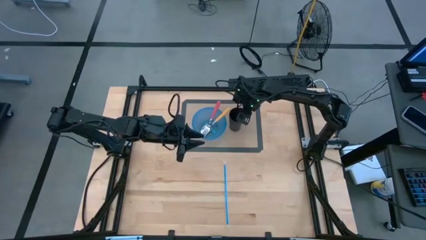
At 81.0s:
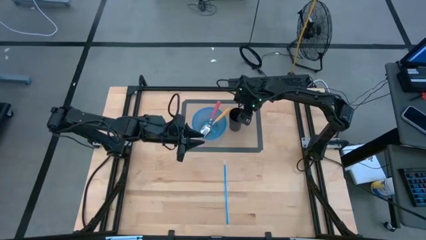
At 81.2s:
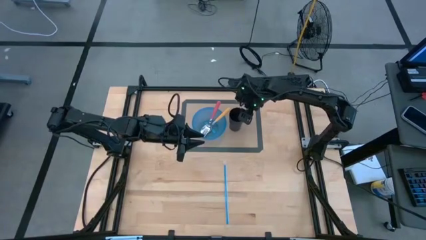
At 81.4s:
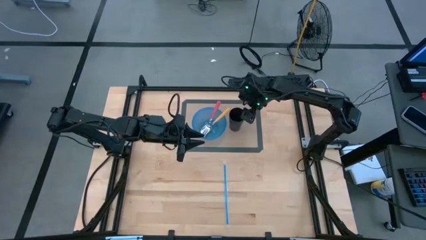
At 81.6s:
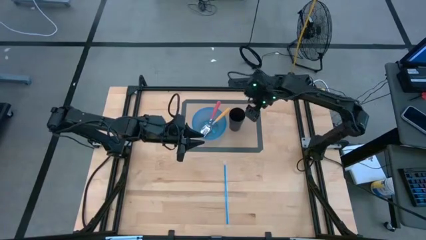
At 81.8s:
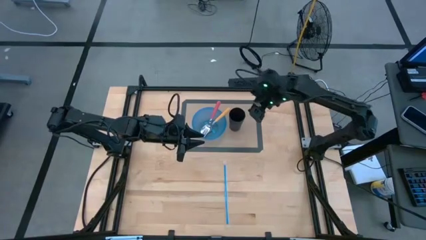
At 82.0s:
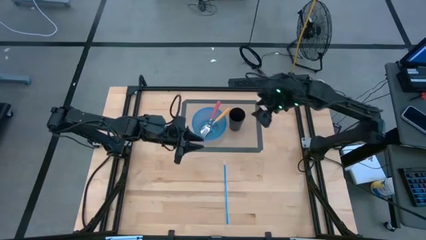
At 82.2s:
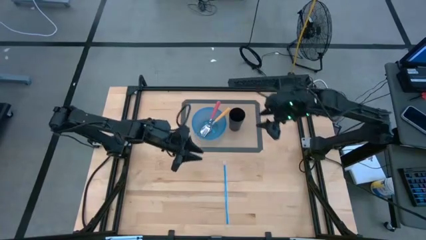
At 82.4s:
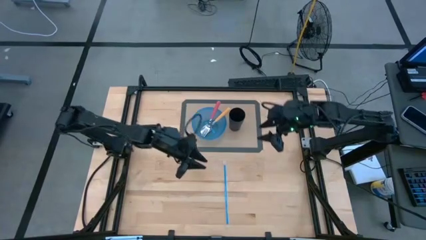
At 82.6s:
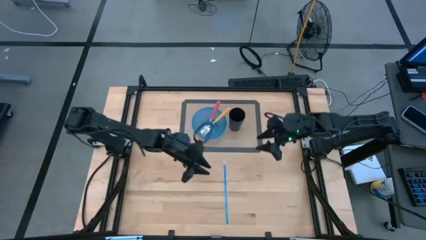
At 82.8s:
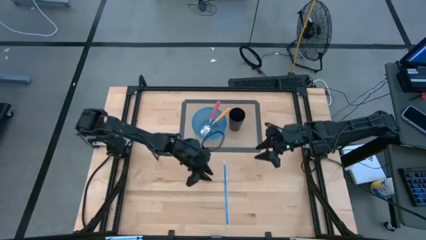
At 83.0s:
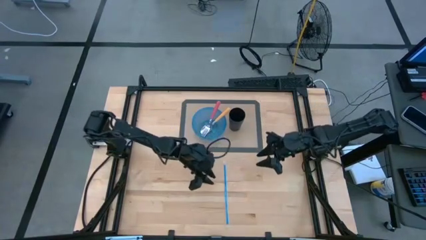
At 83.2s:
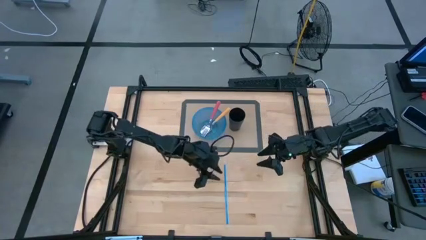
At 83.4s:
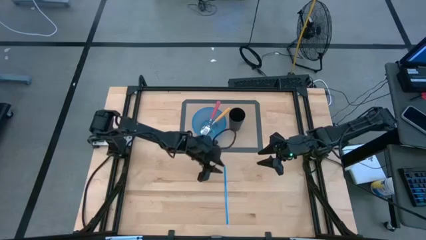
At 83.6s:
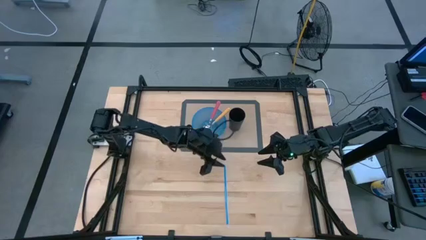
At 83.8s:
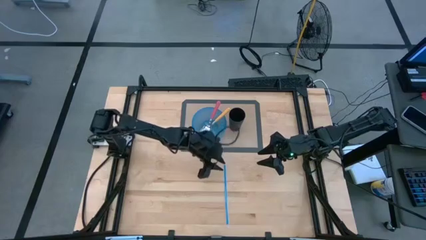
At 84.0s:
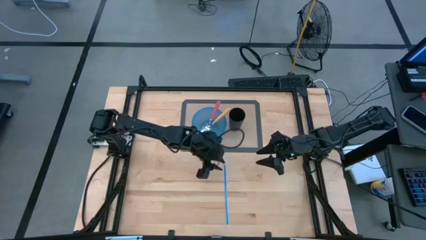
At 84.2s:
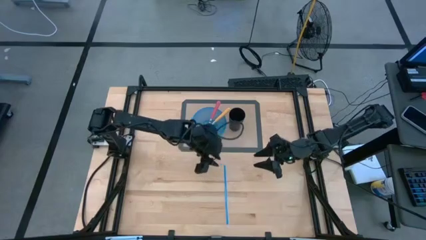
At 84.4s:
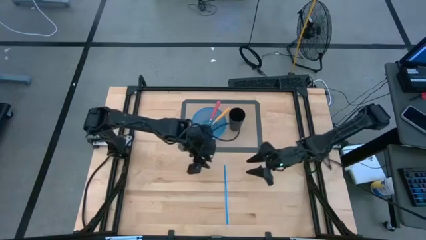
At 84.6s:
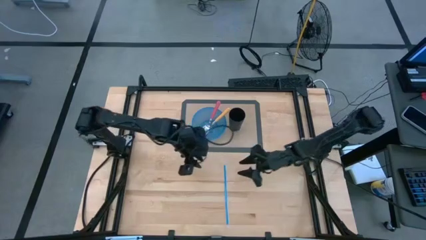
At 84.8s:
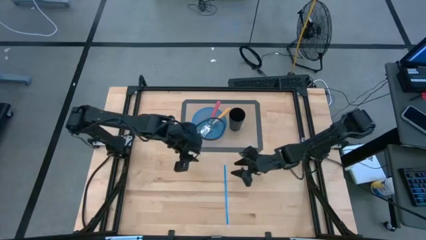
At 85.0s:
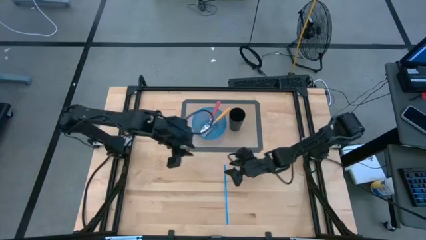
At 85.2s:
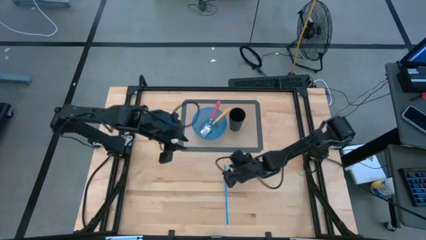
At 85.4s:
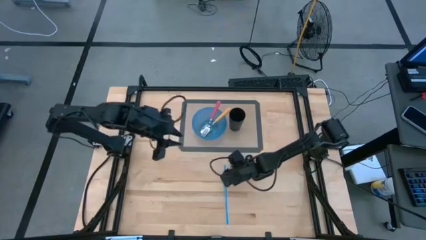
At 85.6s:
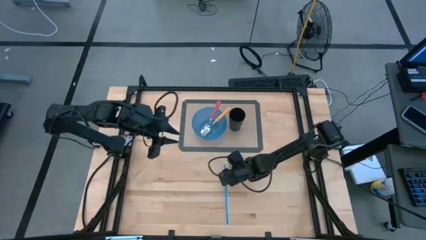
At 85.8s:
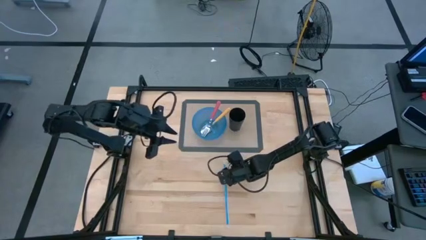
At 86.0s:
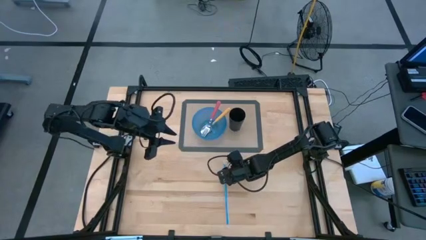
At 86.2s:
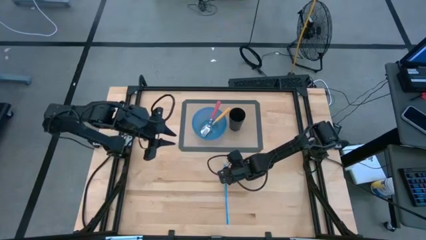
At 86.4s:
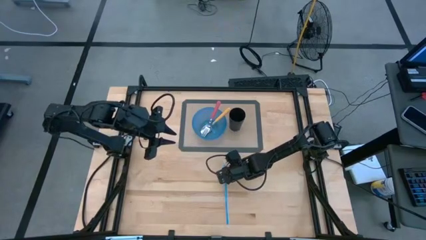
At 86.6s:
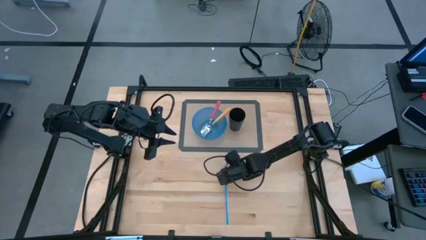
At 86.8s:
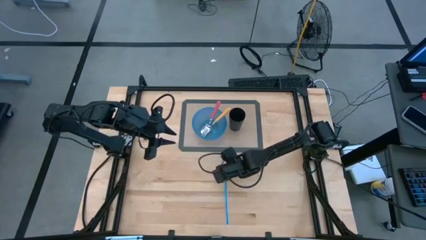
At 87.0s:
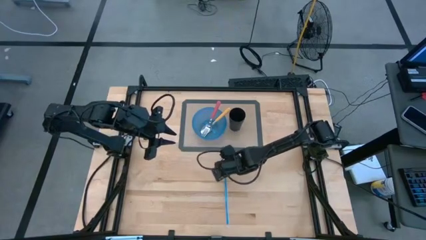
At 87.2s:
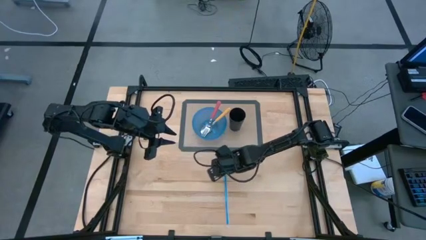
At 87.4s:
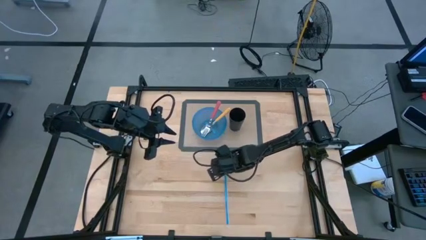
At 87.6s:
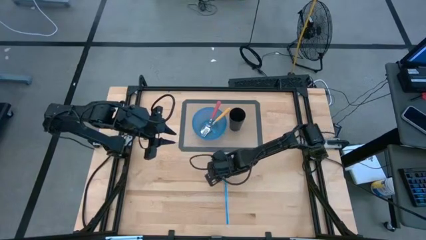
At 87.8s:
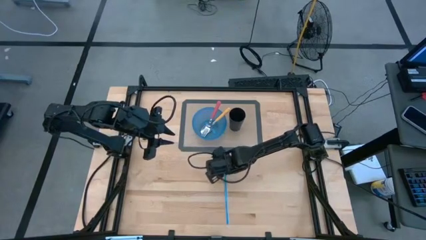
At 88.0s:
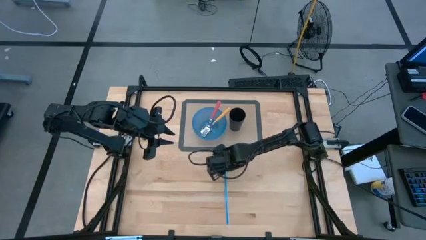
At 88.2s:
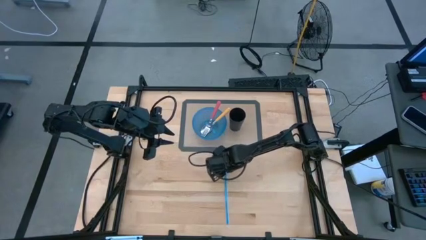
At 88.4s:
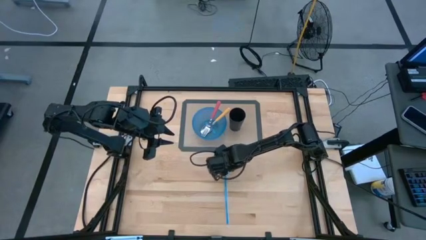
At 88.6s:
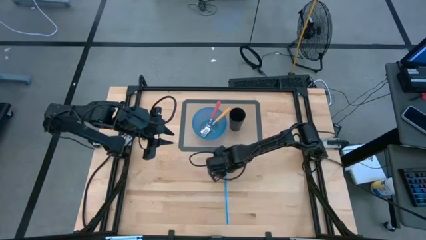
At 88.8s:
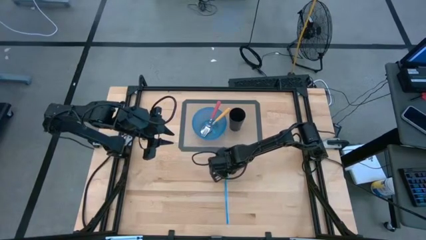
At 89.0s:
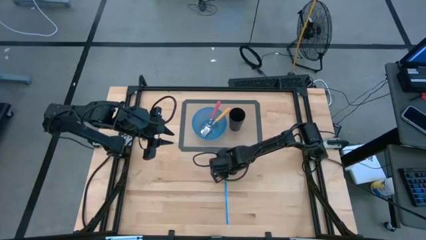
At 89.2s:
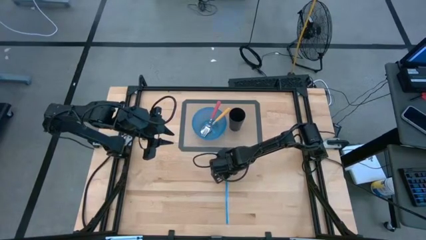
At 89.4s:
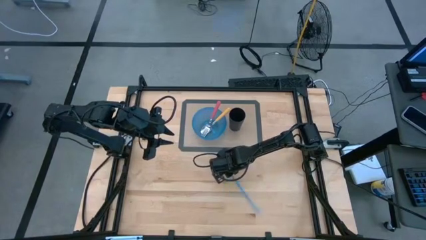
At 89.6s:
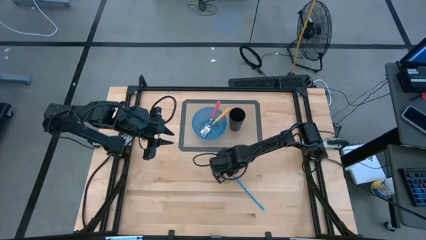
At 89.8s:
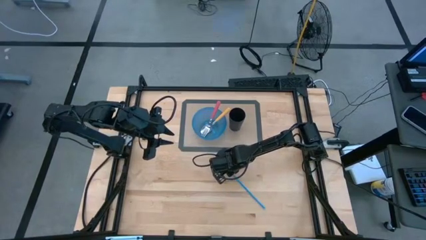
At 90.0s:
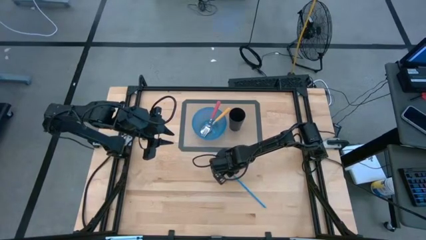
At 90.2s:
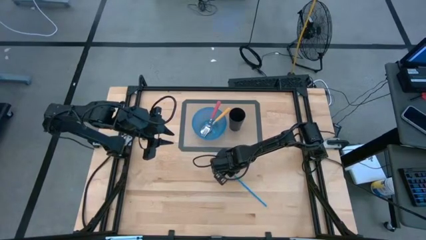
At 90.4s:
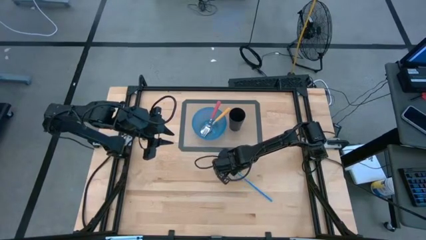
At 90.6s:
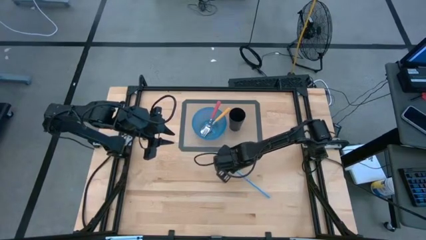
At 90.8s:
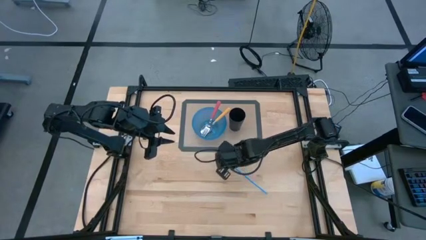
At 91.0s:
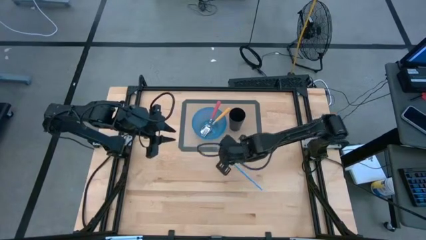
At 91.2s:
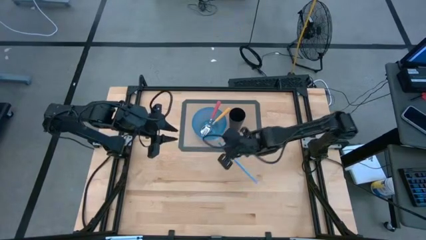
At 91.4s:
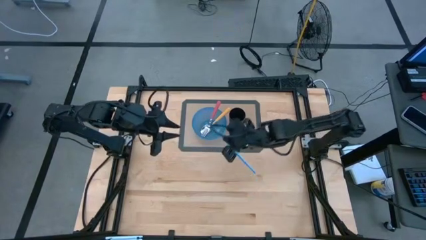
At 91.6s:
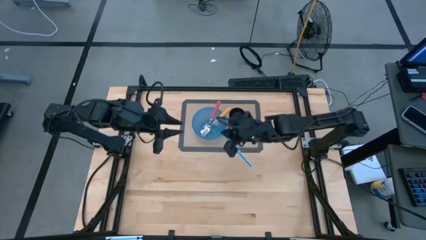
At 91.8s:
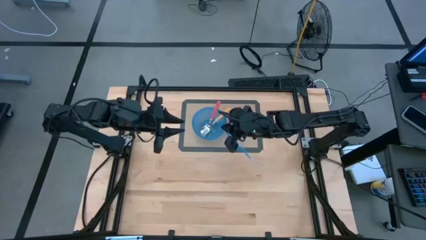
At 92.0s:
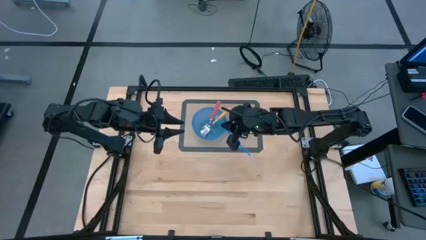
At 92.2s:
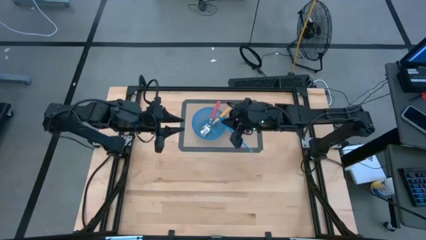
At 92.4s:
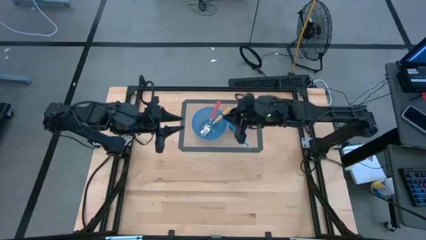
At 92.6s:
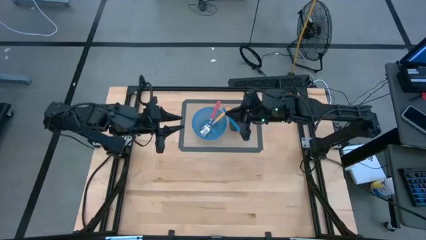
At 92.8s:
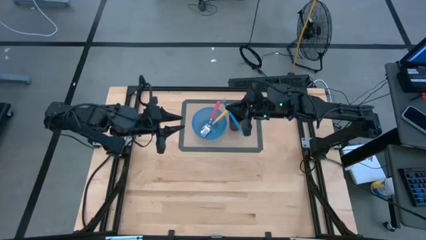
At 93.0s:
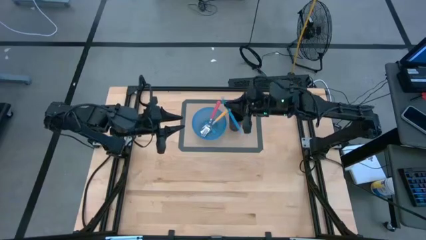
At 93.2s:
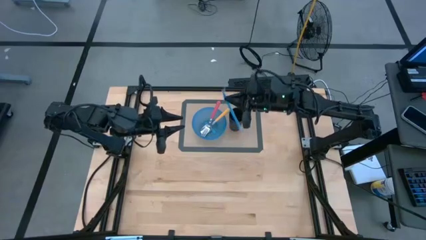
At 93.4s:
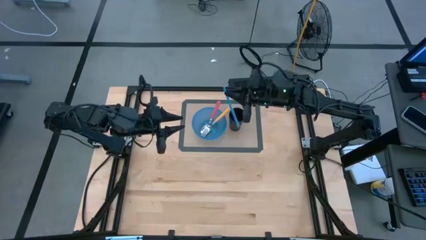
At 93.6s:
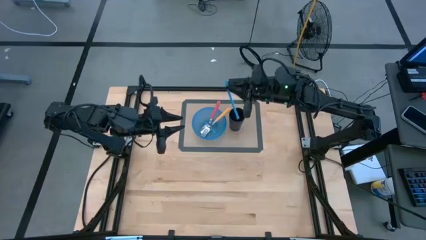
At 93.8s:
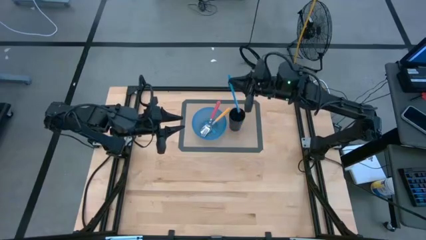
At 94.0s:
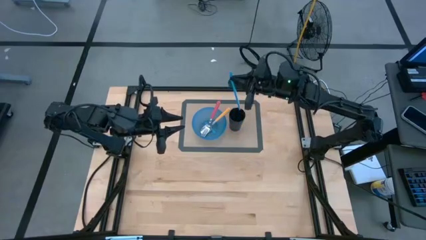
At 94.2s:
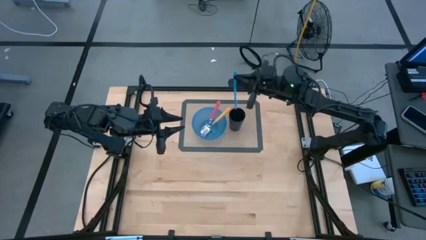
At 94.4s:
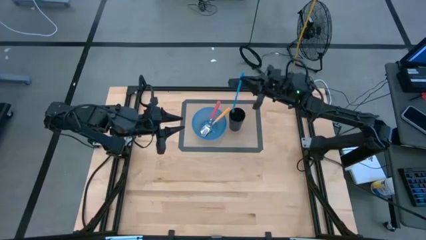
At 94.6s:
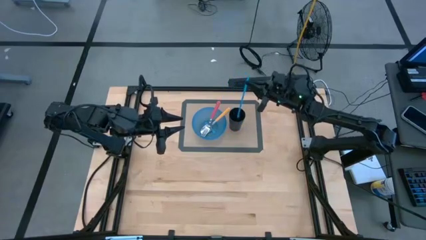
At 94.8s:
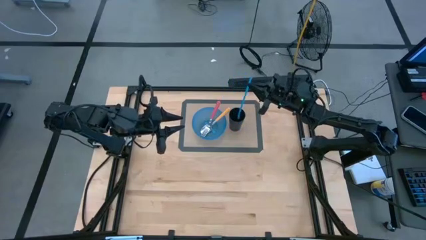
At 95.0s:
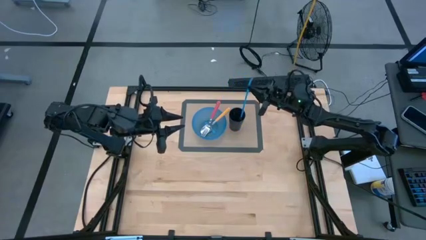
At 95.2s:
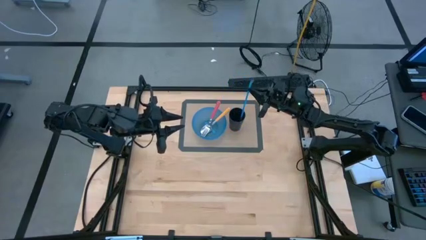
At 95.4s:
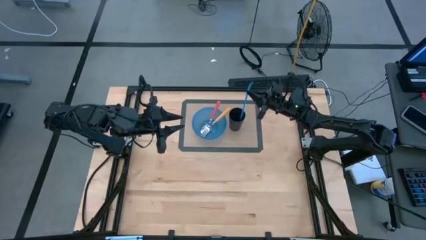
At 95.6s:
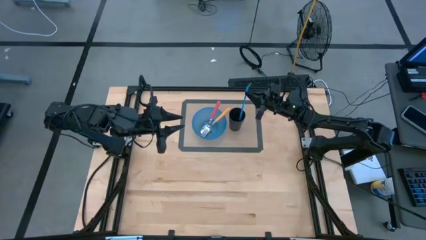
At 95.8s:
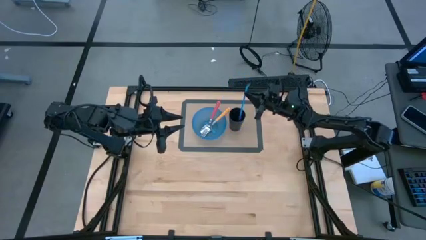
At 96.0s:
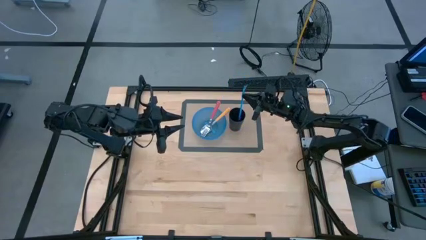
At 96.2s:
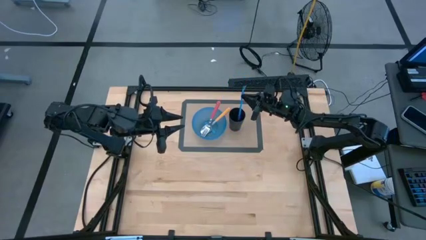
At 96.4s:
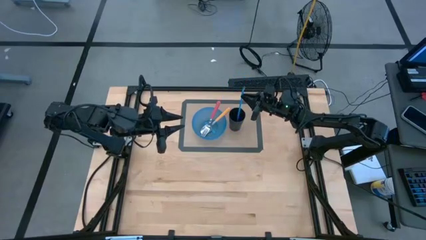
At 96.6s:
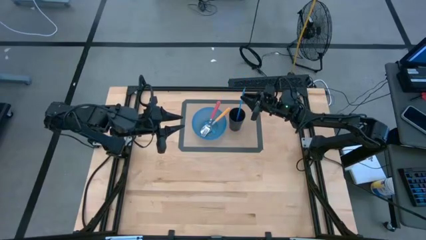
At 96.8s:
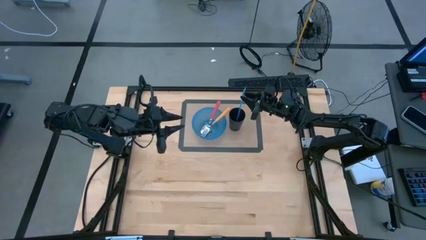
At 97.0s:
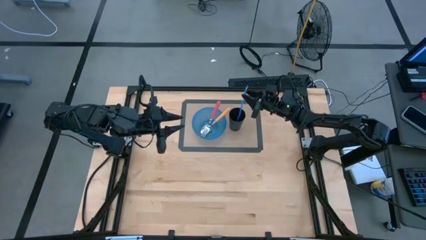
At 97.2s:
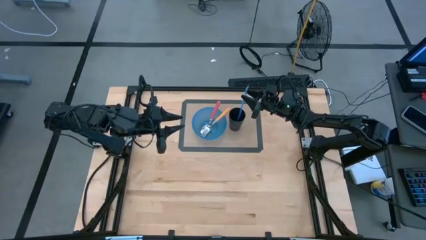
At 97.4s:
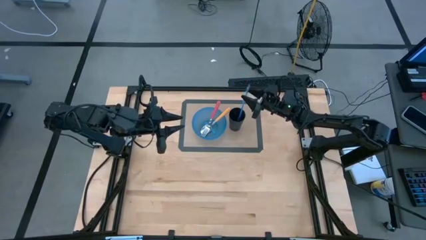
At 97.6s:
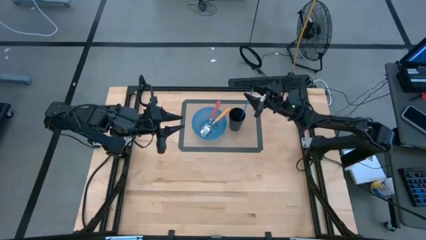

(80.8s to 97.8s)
Task: Pick & Place Utensil
Put the blue straw into the black cup
